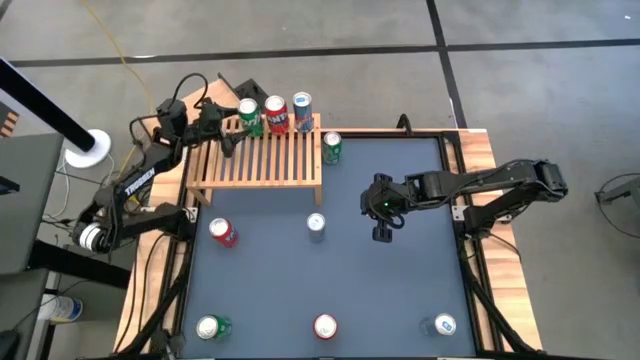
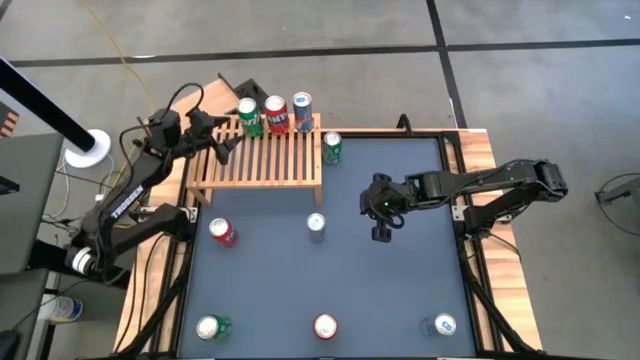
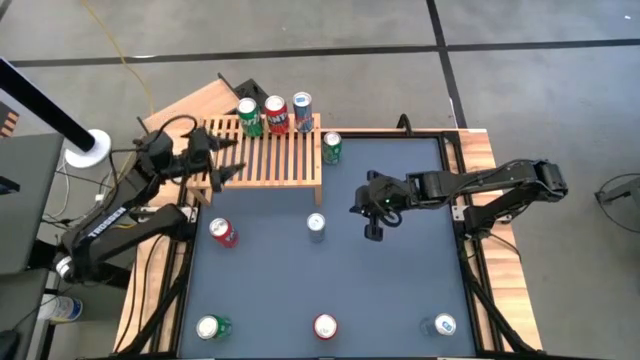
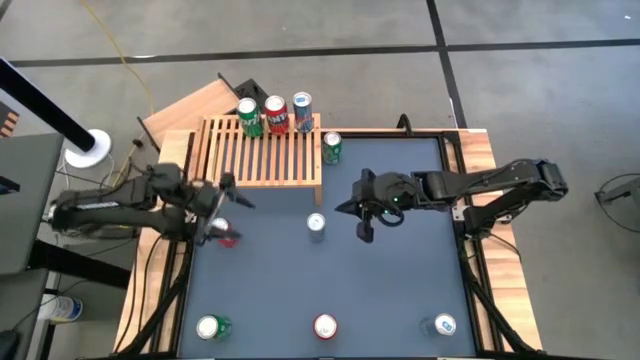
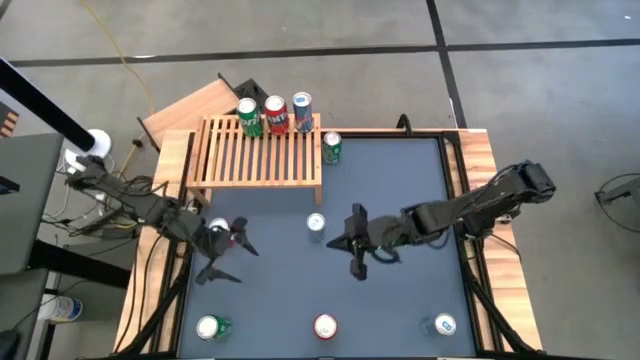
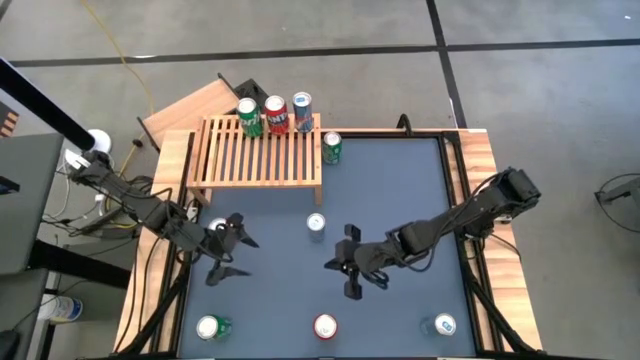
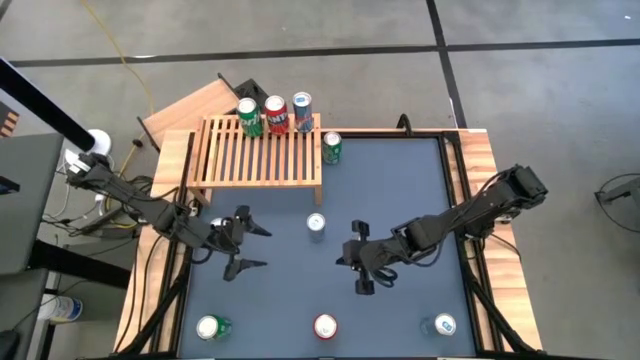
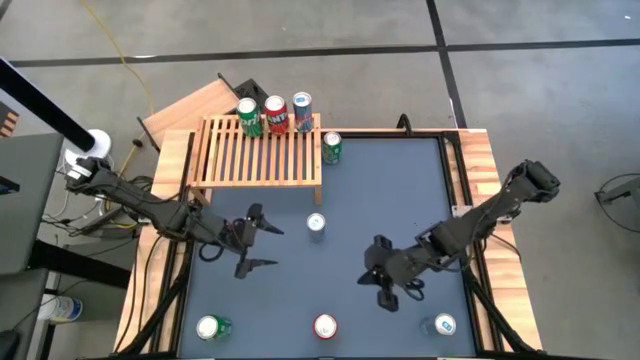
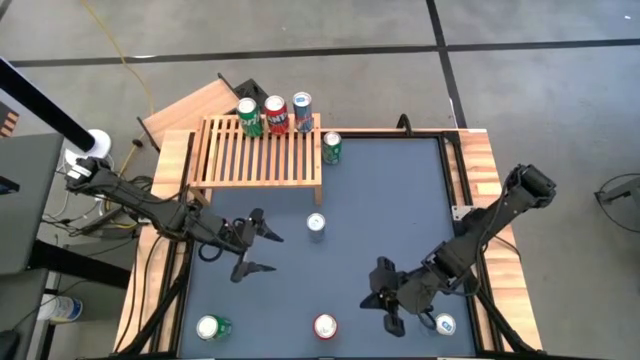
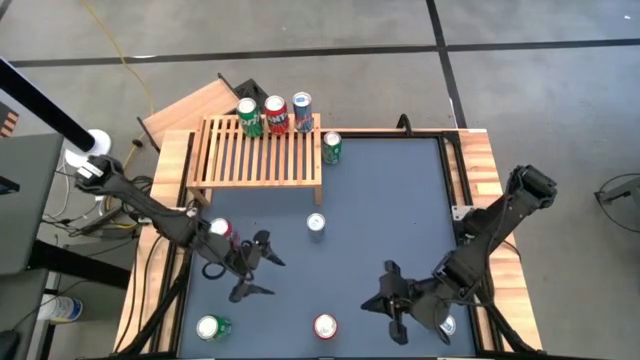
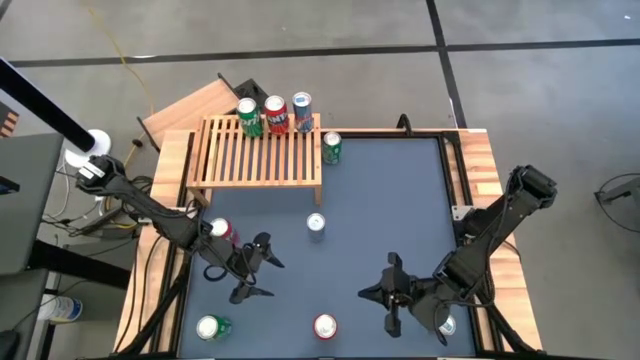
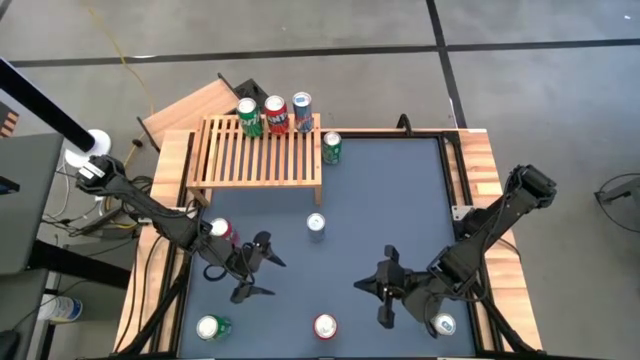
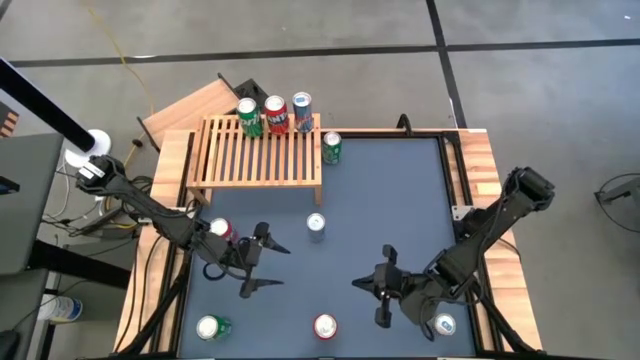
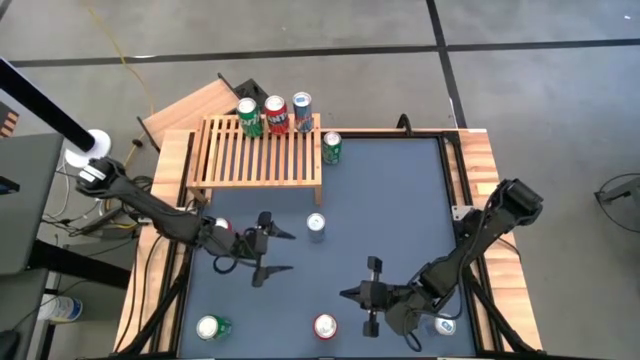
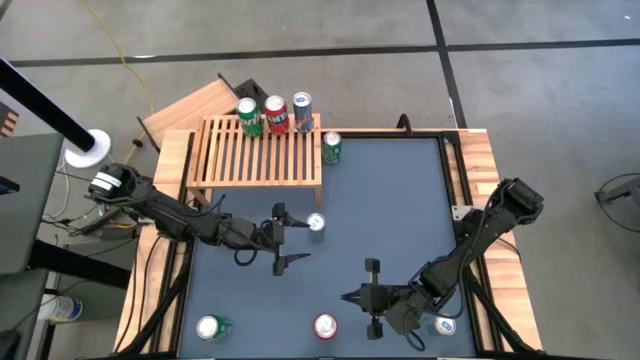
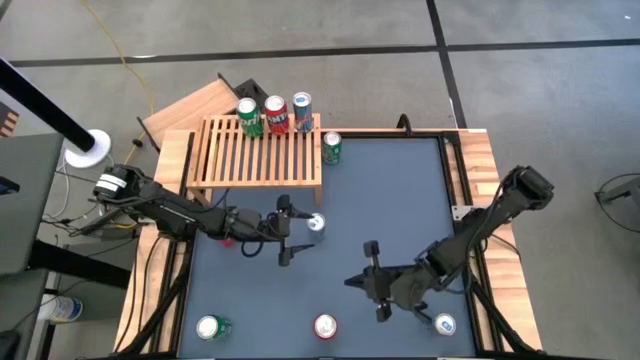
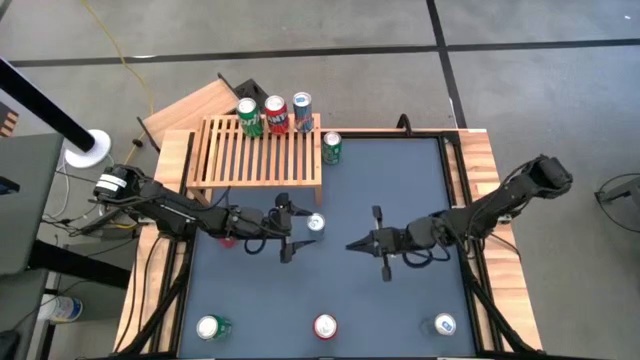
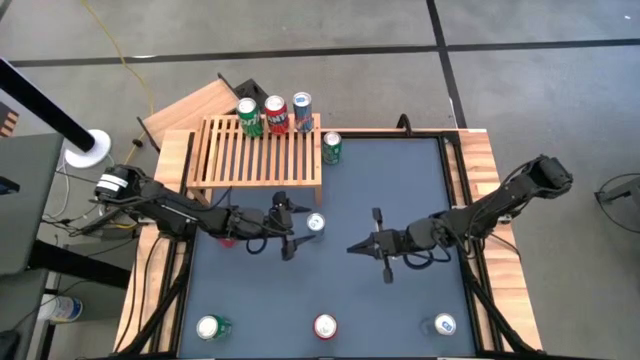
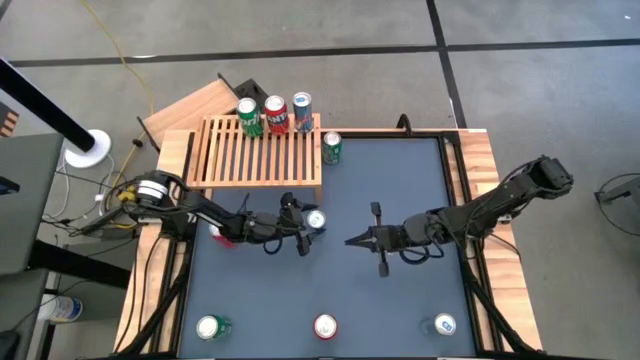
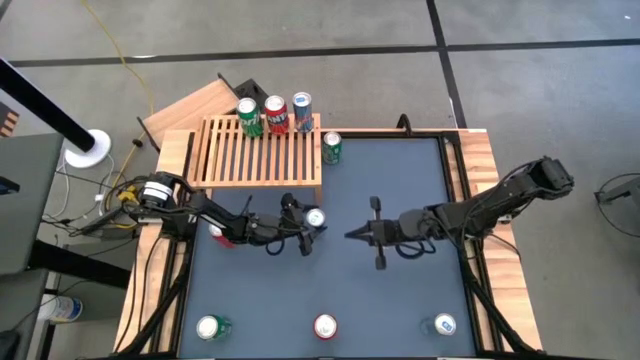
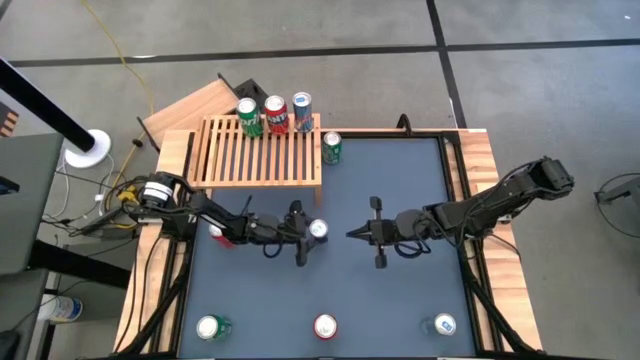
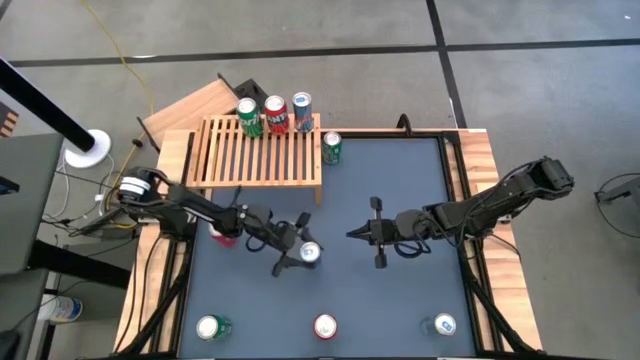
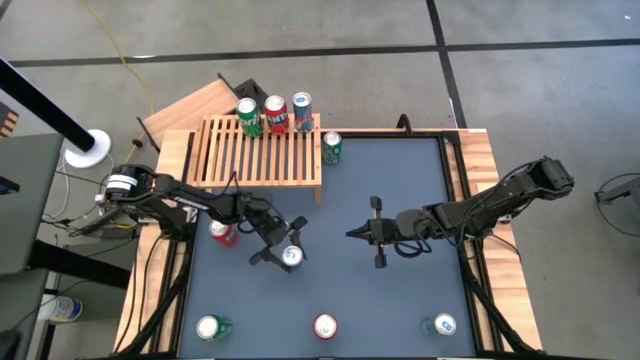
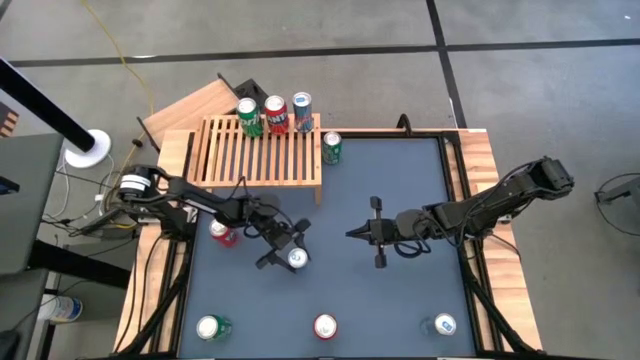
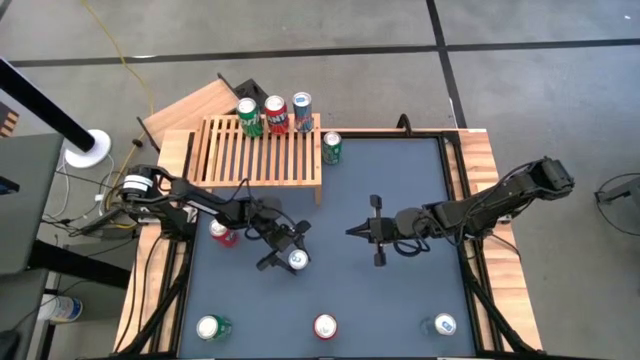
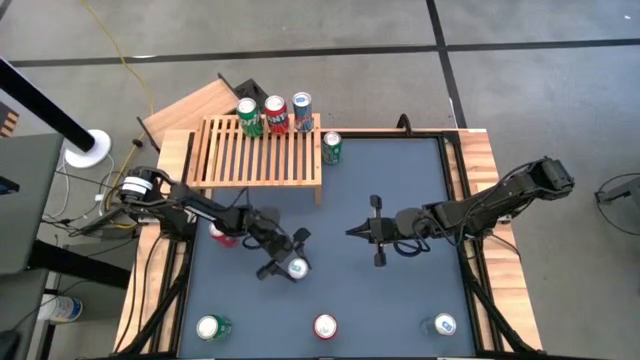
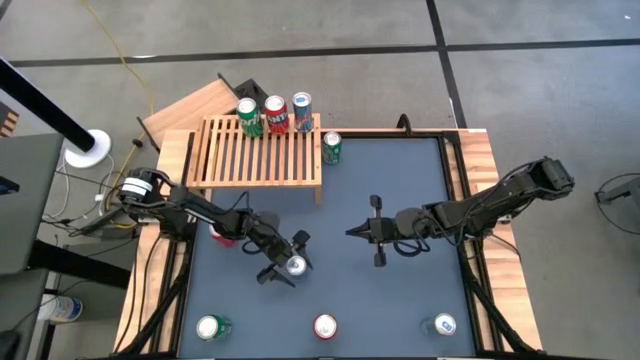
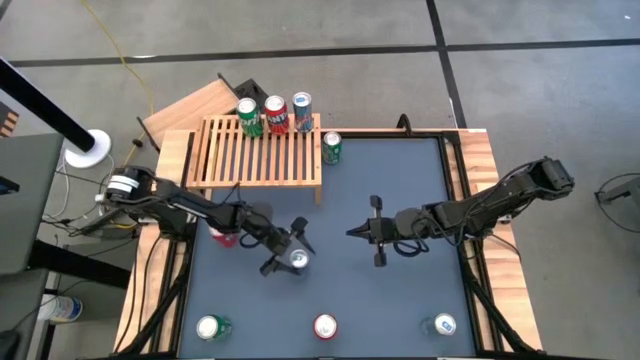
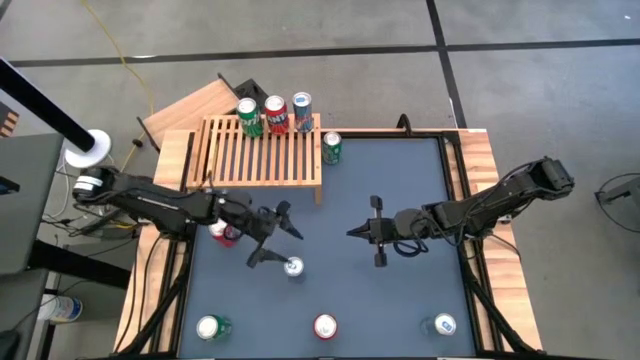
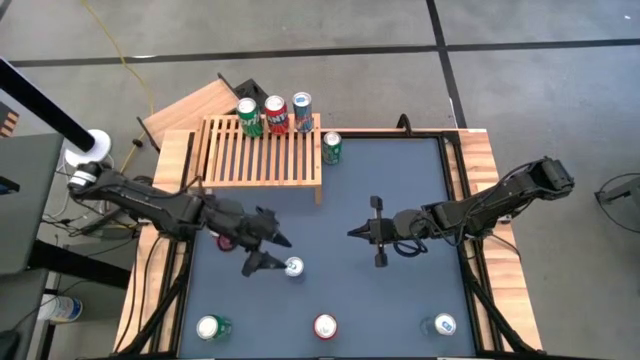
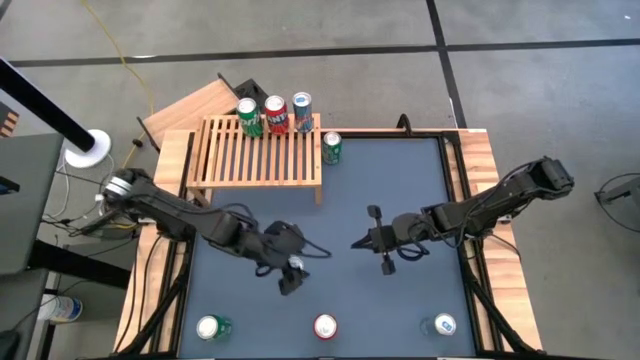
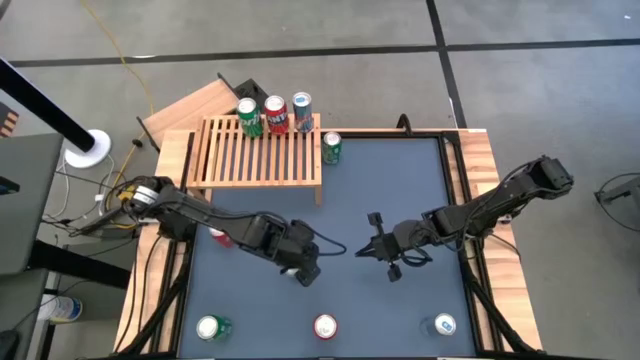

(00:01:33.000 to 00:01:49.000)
Task: Place canned beverage on shelf
Put the top blue soda can on the shelf aligned with the other blue soda can
